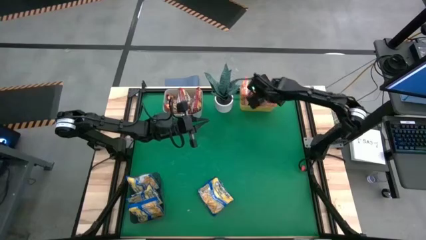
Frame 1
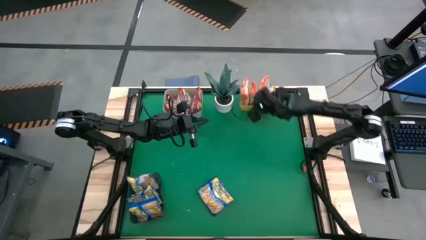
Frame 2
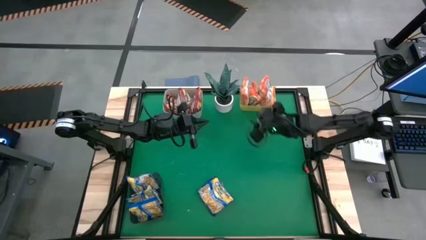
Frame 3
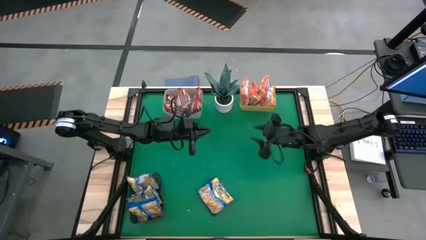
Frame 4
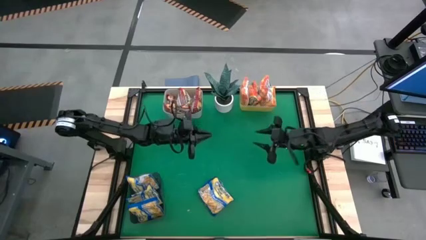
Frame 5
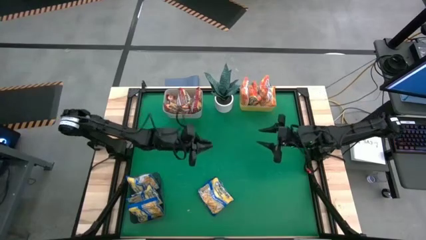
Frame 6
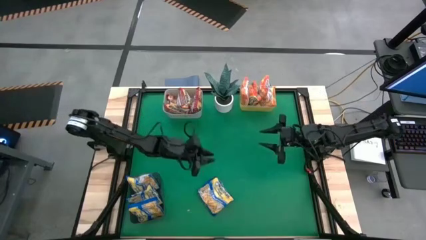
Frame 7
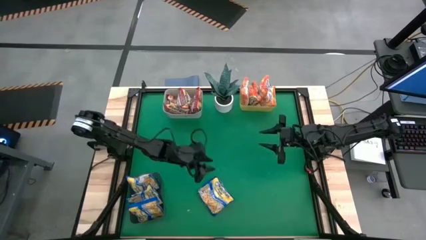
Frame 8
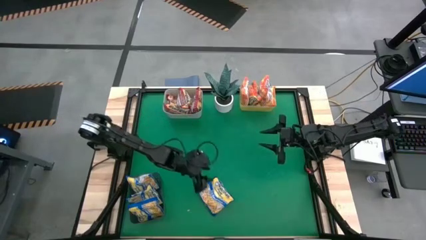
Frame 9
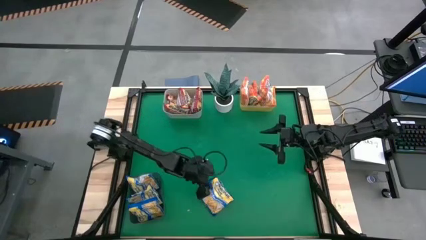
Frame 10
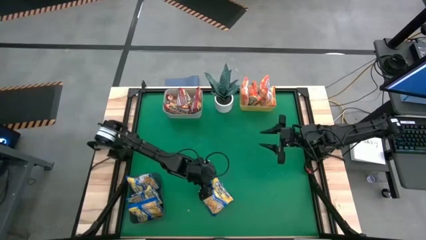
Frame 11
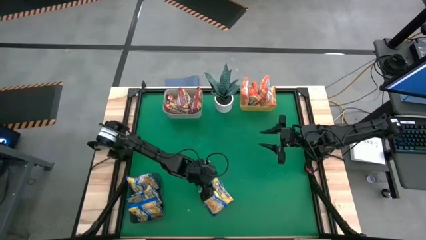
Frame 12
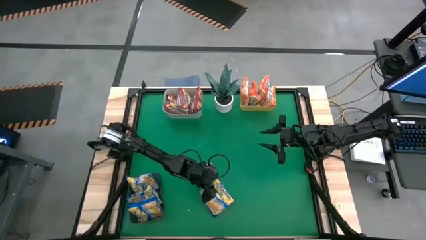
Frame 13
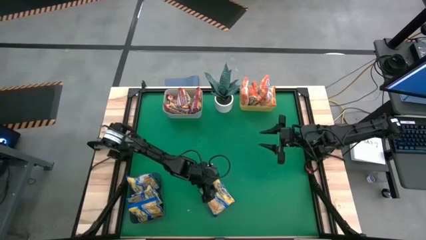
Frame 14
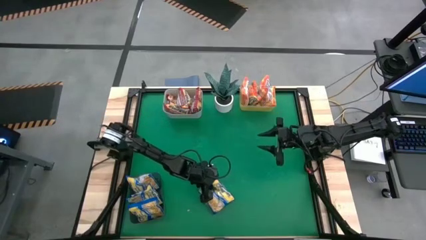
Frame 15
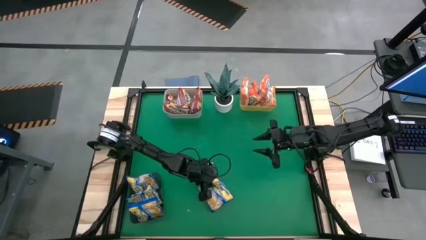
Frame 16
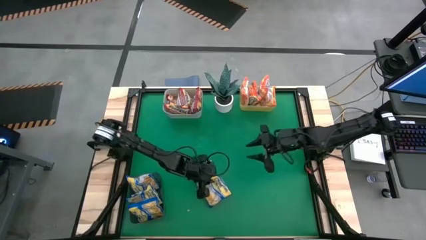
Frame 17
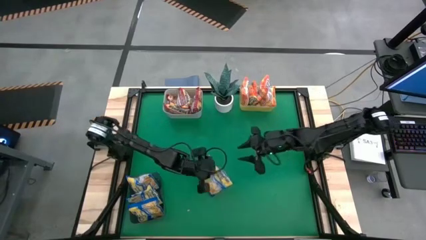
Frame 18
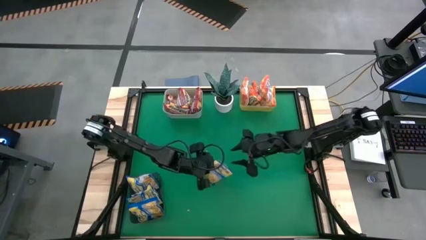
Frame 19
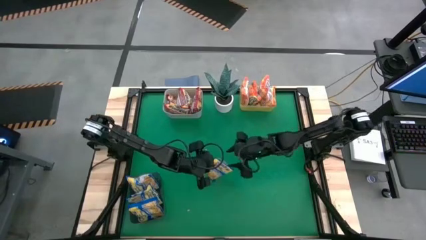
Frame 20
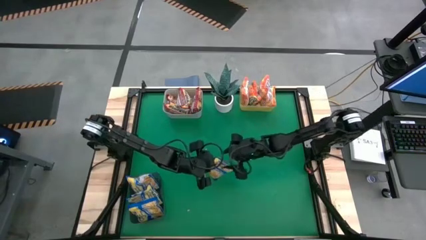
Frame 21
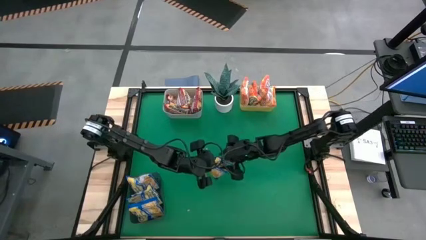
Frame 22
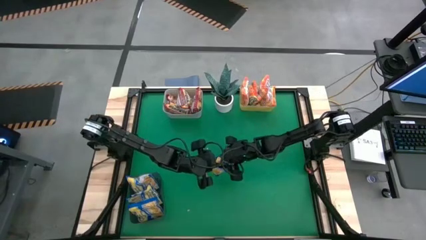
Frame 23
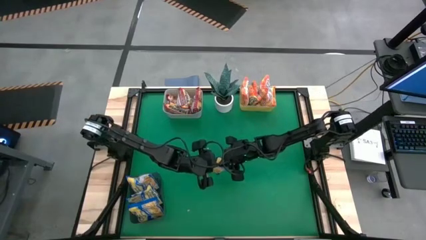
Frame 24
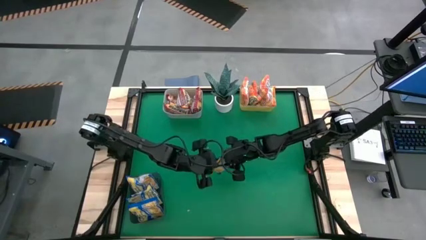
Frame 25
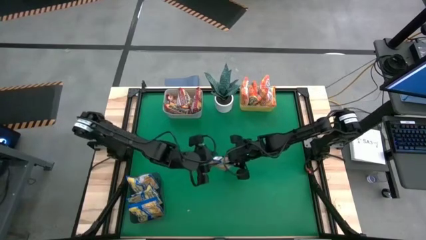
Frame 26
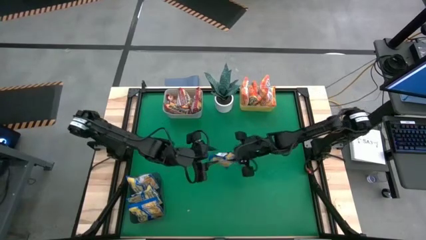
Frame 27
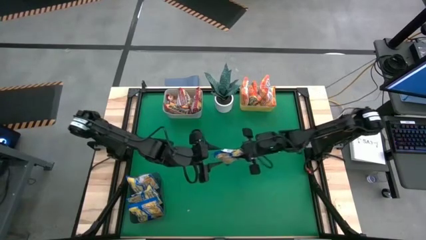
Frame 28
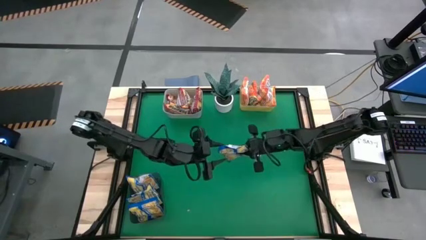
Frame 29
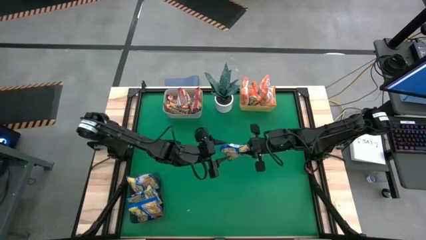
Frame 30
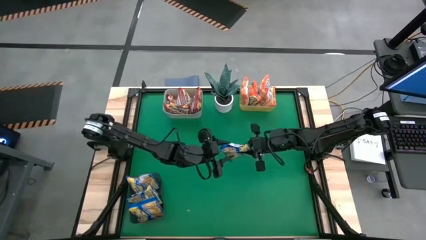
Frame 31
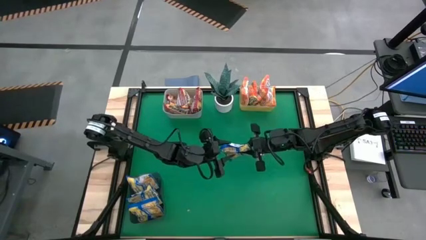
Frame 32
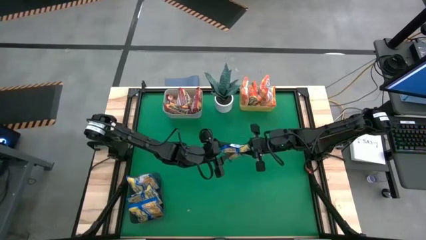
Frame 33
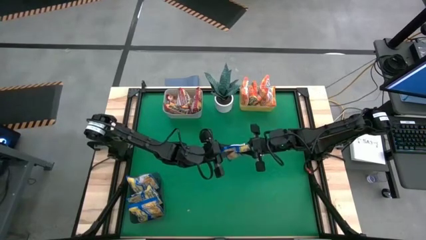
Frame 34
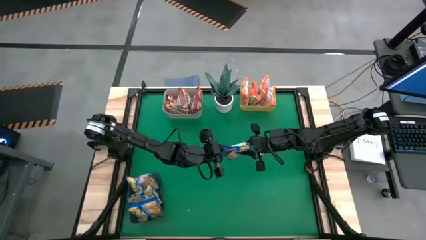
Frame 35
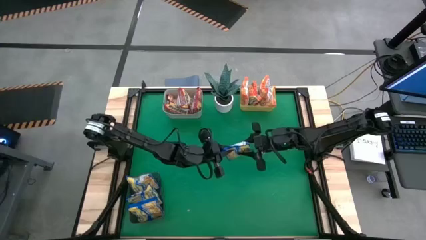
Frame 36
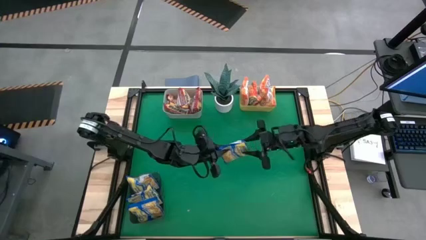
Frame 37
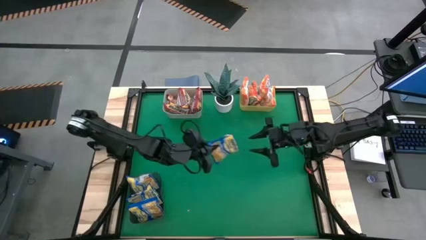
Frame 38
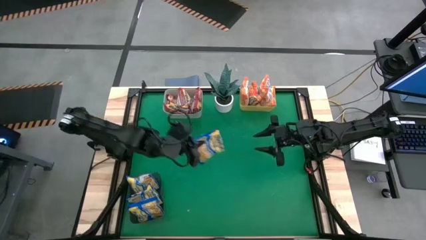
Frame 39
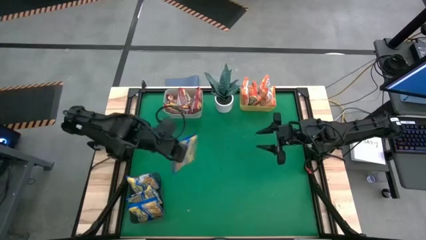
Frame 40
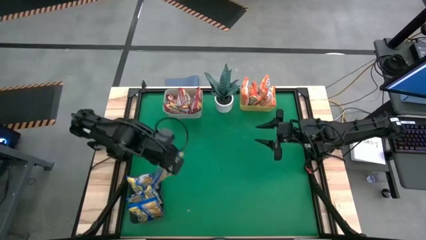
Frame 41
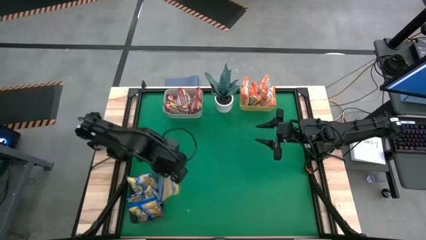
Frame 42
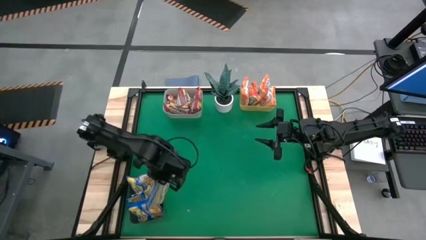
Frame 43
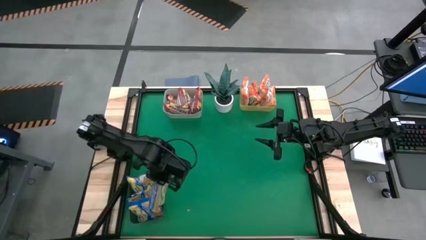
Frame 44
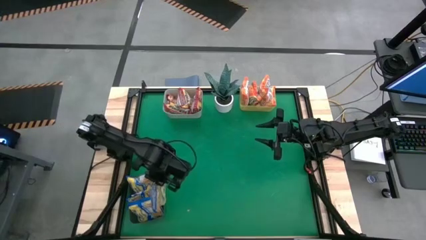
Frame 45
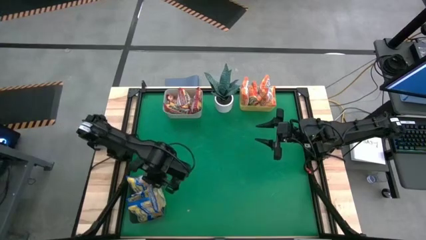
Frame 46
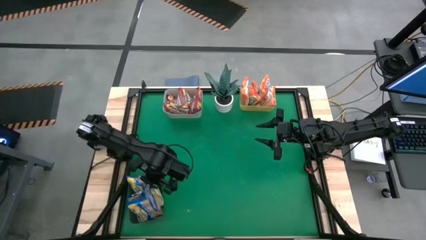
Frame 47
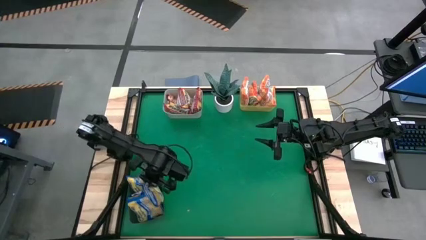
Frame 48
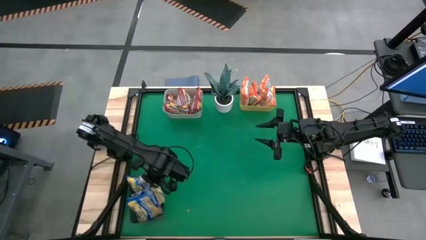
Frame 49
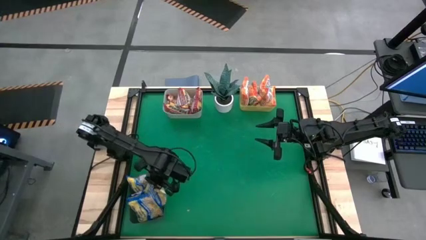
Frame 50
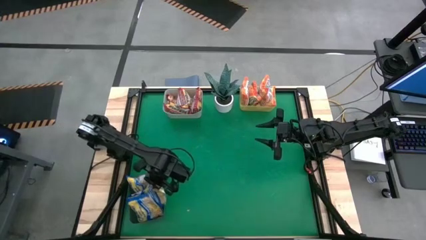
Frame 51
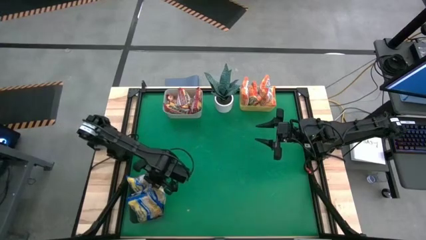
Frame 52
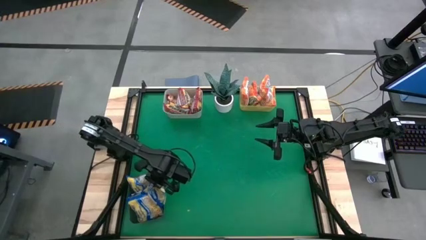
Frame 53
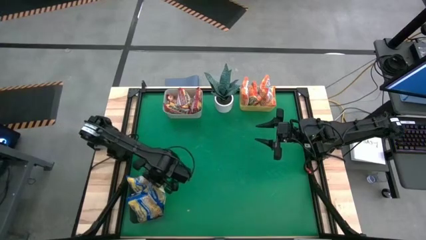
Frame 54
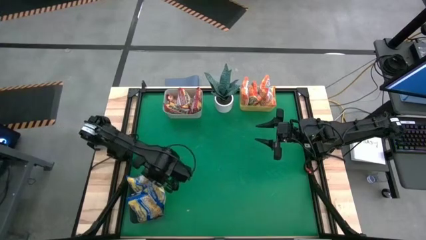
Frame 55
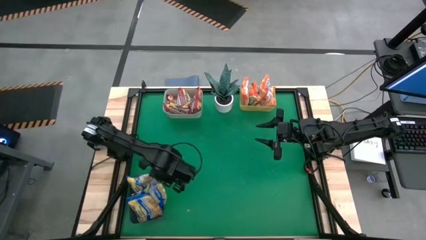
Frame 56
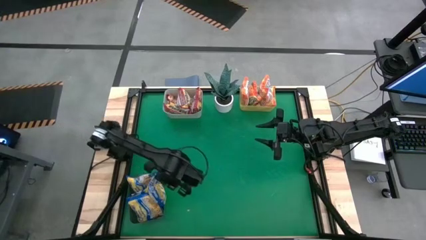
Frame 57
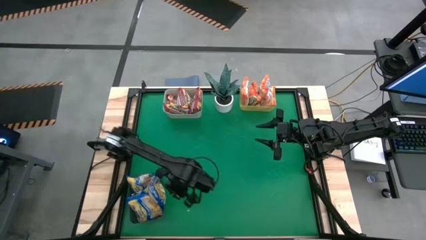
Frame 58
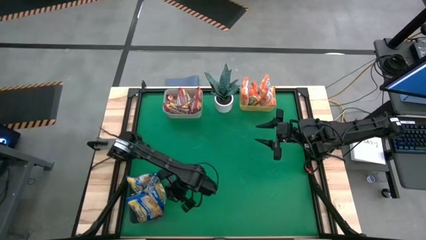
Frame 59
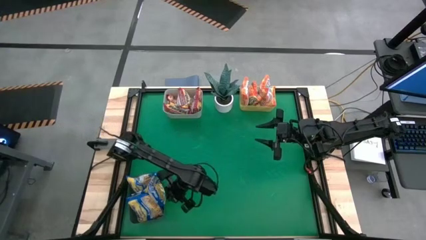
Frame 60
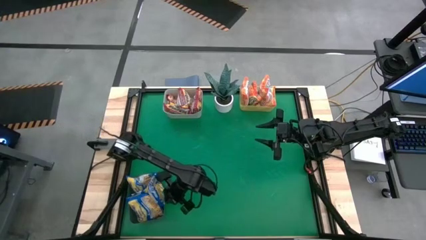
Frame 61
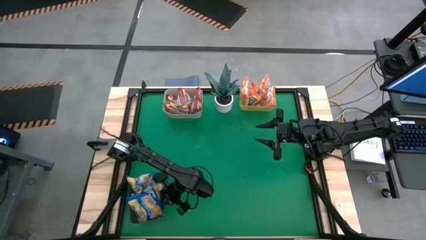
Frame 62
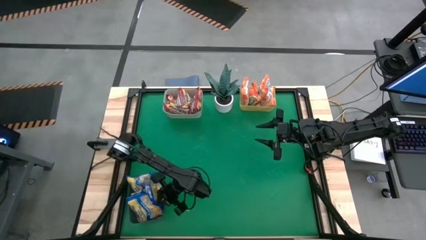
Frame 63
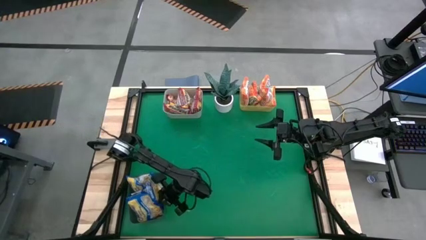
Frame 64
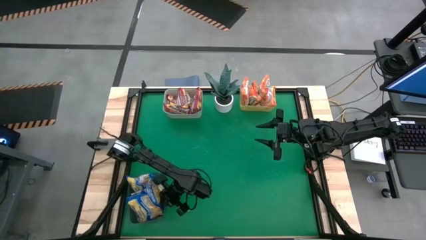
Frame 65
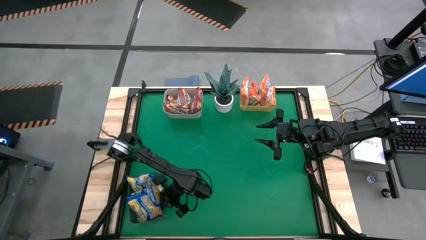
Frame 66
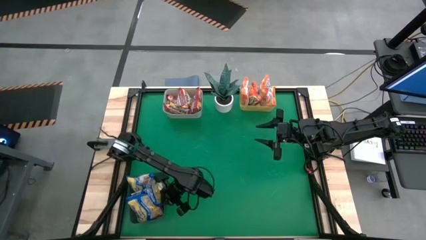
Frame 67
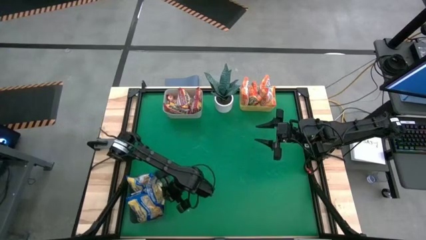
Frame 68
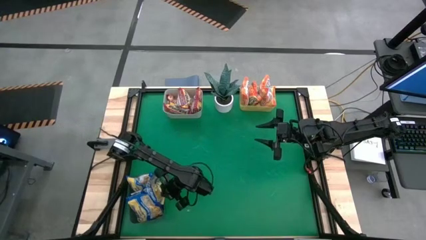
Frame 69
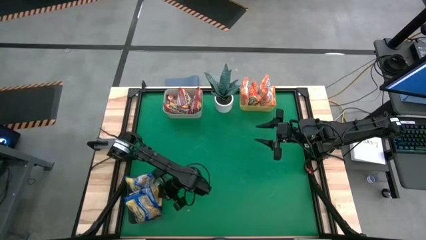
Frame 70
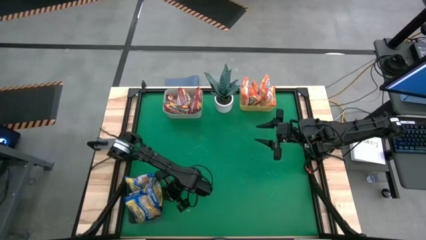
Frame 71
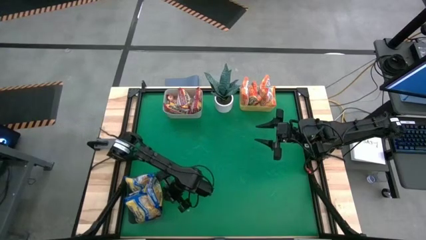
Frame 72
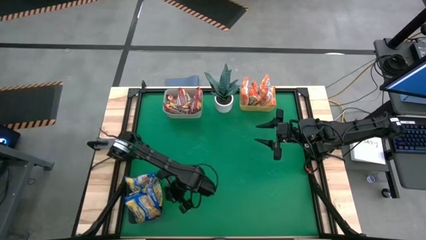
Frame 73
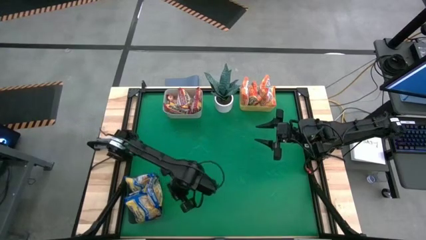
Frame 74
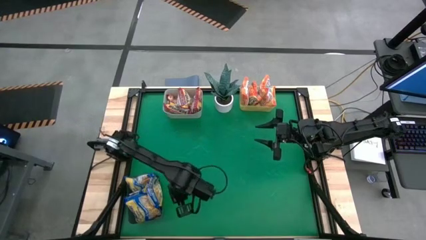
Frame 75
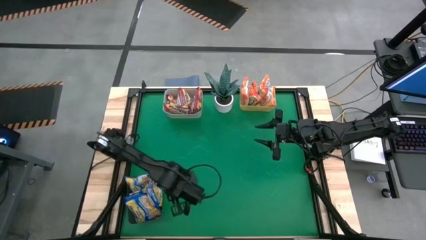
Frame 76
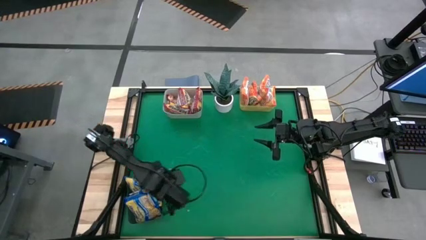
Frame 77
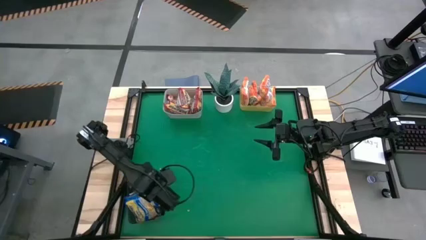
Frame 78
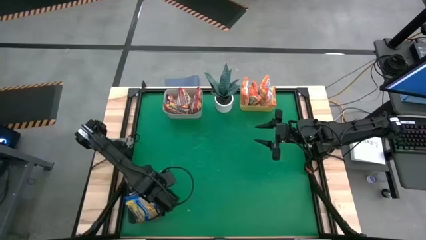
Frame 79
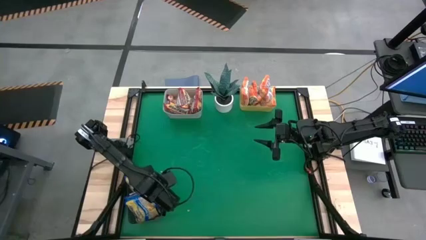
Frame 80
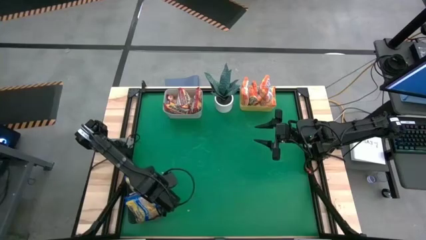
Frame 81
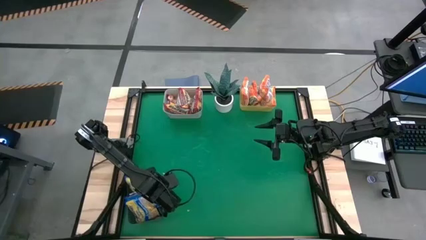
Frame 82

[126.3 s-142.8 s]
Task: Sort Maruchan noodles
Put the blue noodle pack into the black bin

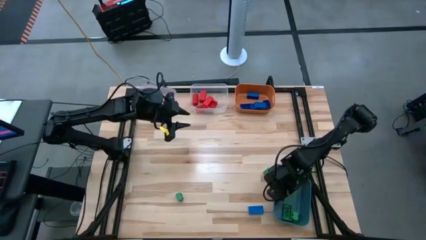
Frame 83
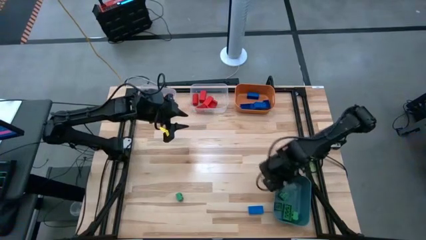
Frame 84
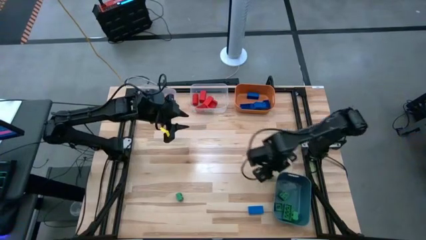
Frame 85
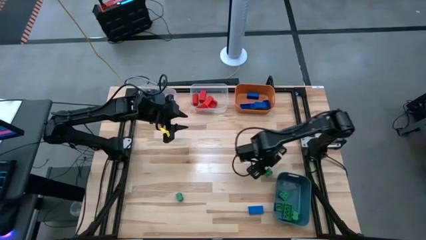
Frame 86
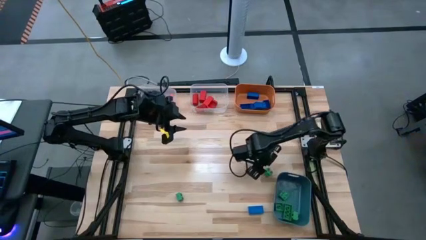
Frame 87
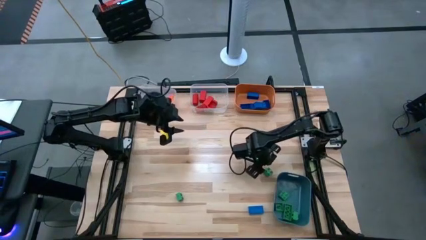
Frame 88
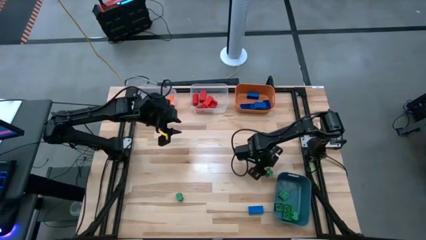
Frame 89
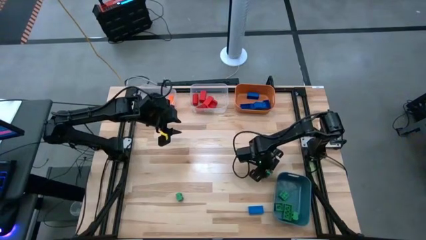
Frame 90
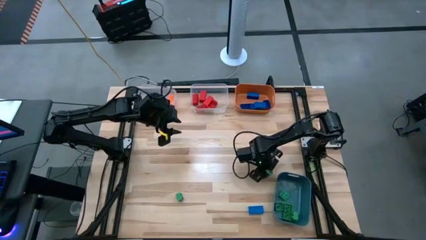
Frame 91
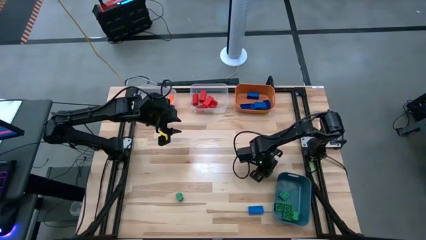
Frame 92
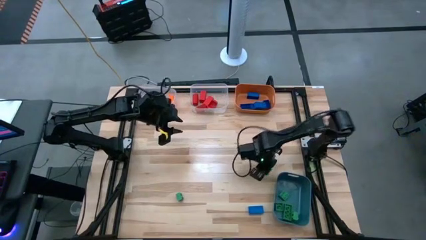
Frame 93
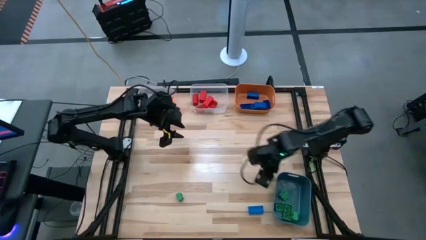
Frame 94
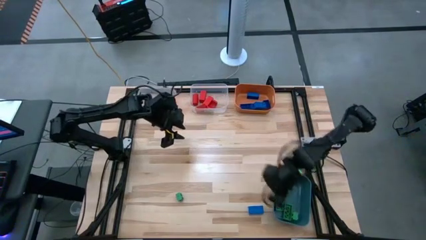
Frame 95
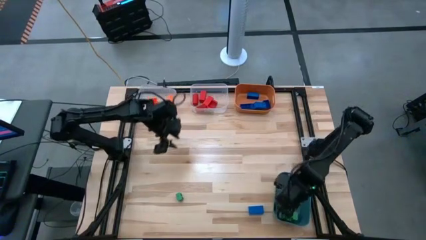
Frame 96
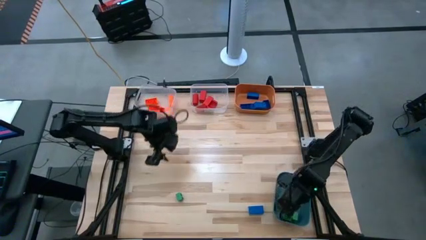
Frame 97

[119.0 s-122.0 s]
Task: Sort blocks
Put the green game piece into the blue bin
